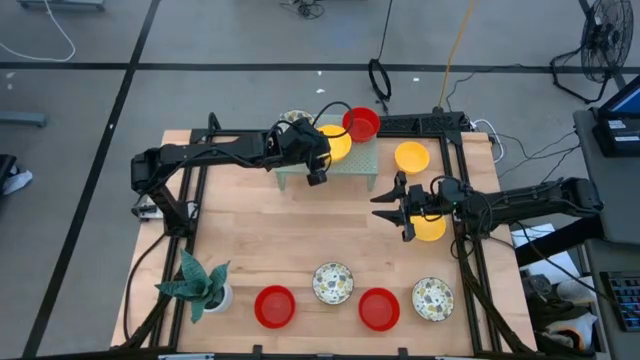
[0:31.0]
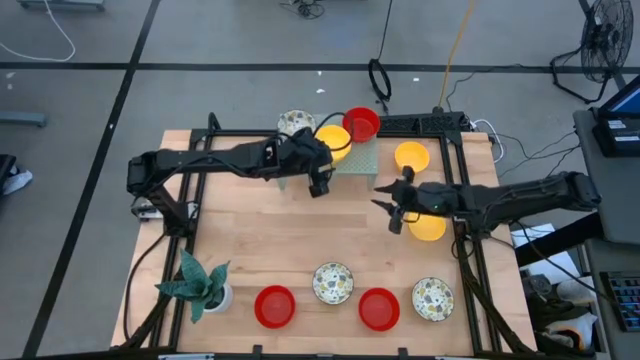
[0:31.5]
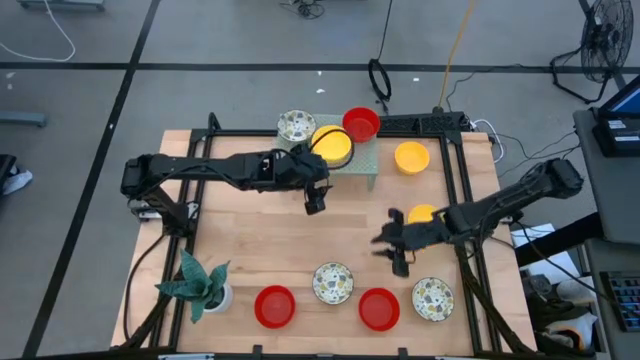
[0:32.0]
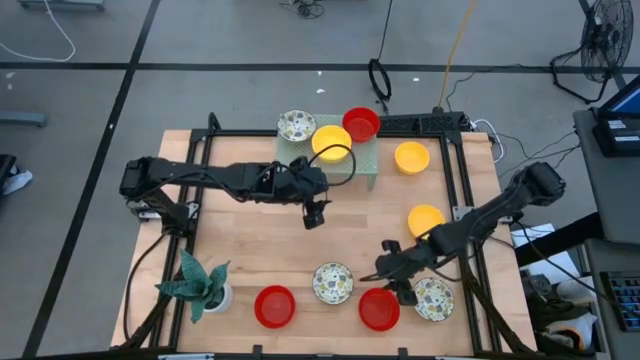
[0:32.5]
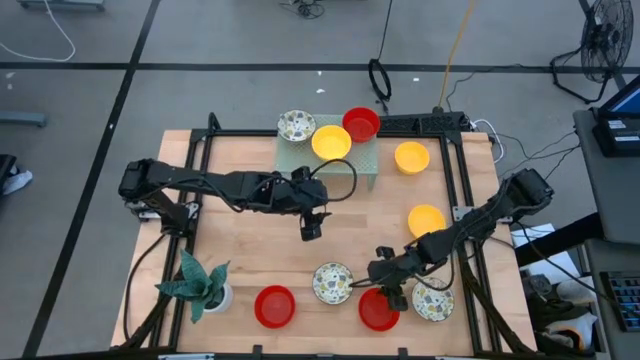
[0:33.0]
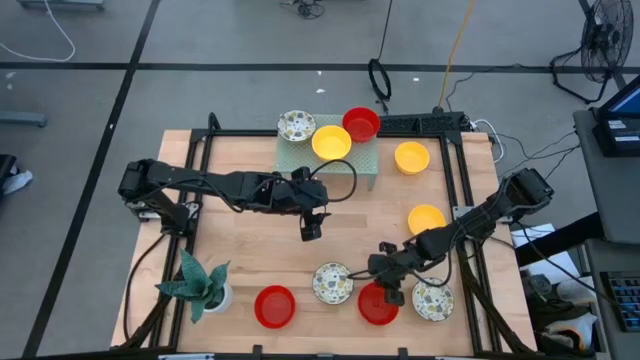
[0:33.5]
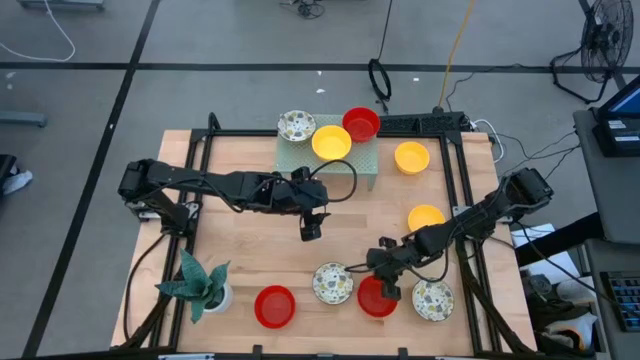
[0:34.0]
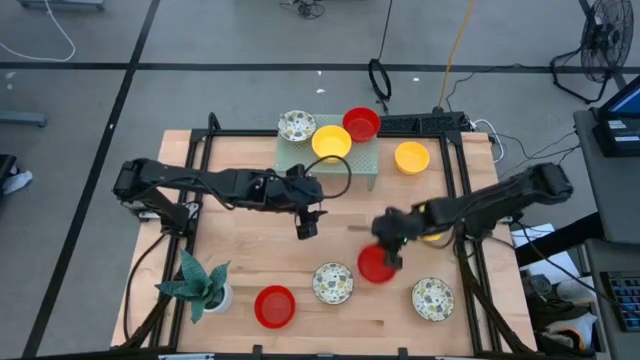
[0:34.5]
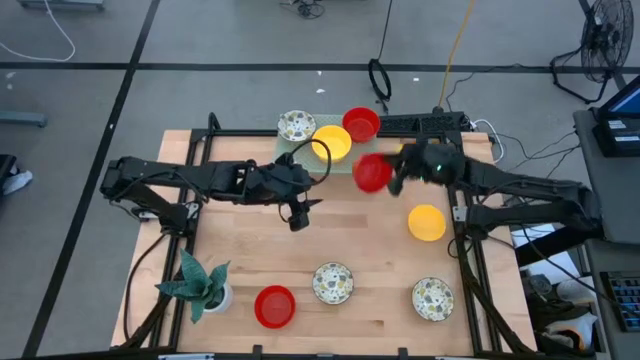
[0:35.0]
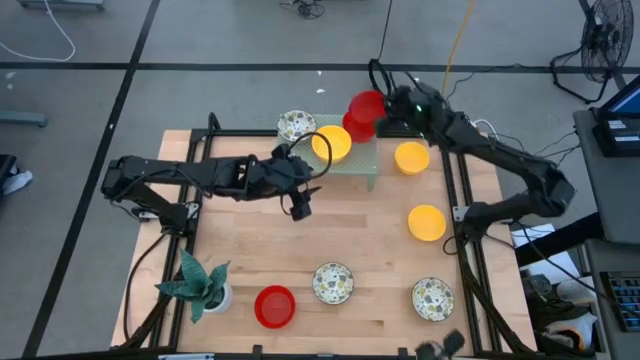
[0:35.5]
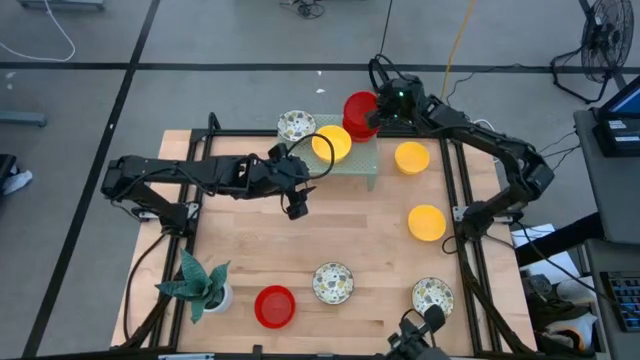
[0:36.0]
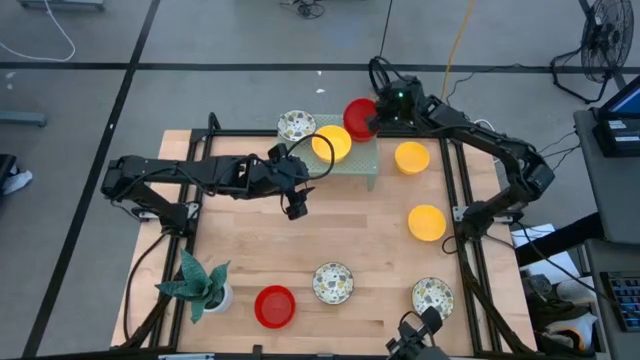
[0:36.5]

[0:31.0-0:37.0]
Task: Pick & Place Mini bowls
Stack the red bowl on top of the other red bowl on the shelf

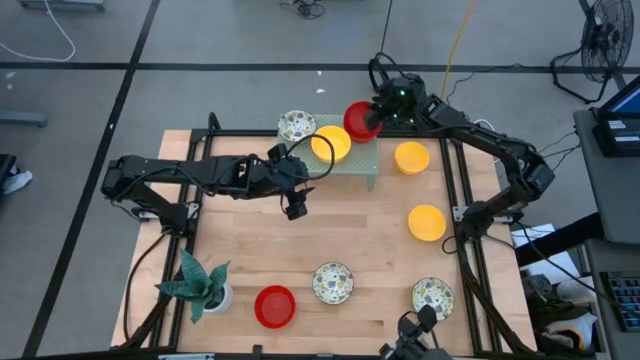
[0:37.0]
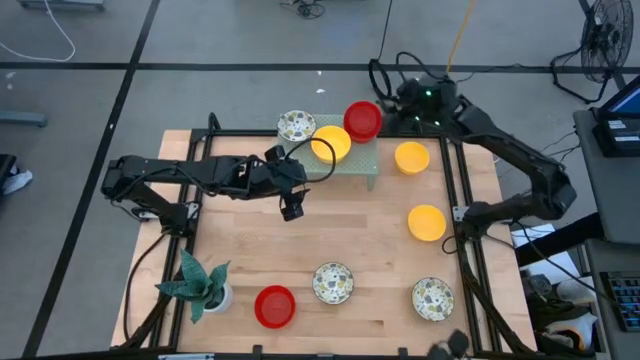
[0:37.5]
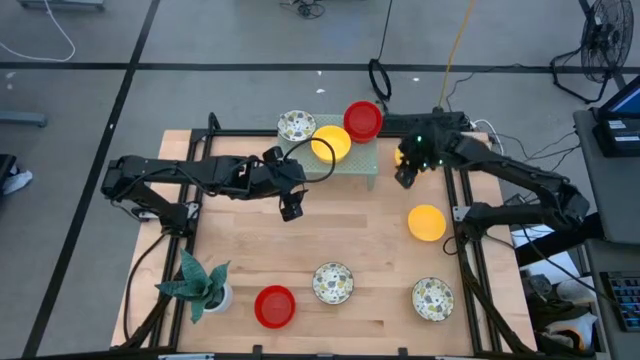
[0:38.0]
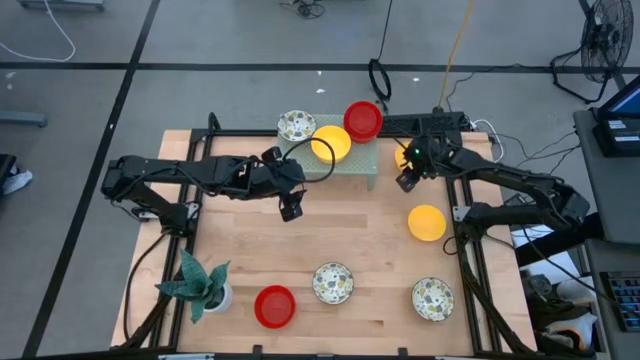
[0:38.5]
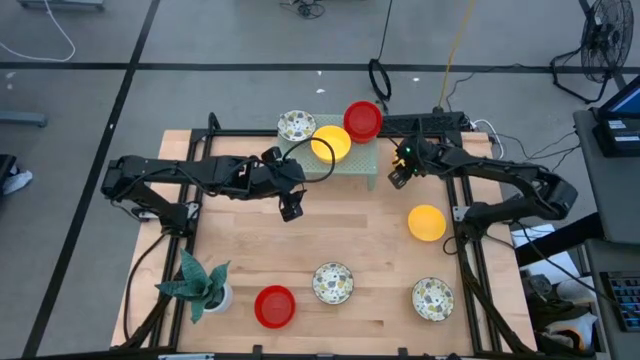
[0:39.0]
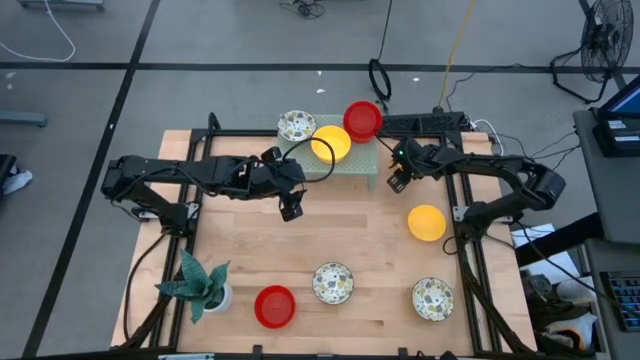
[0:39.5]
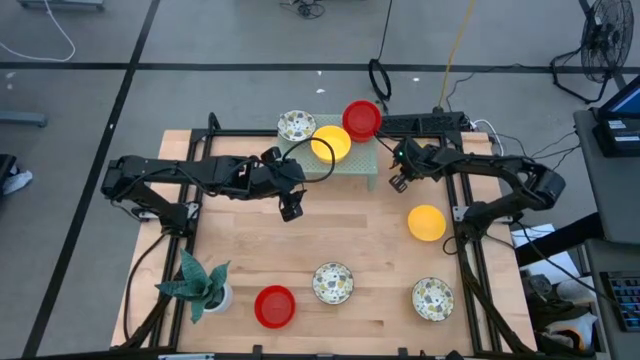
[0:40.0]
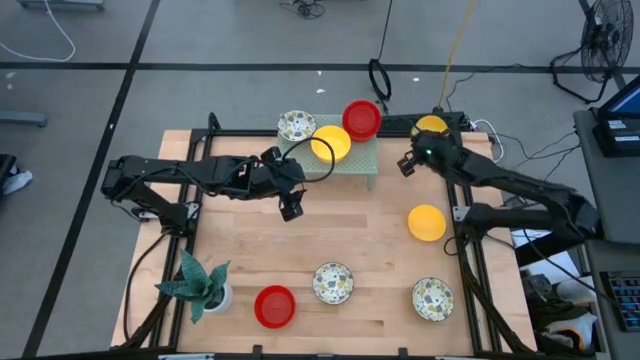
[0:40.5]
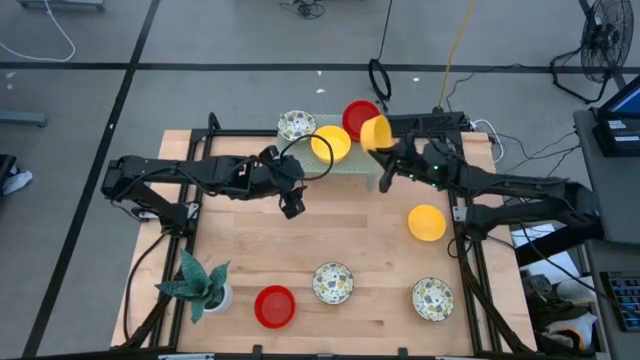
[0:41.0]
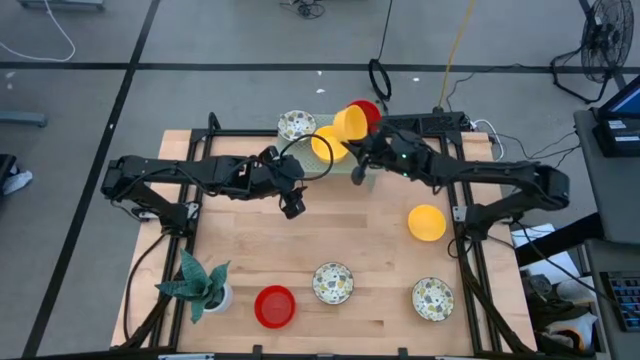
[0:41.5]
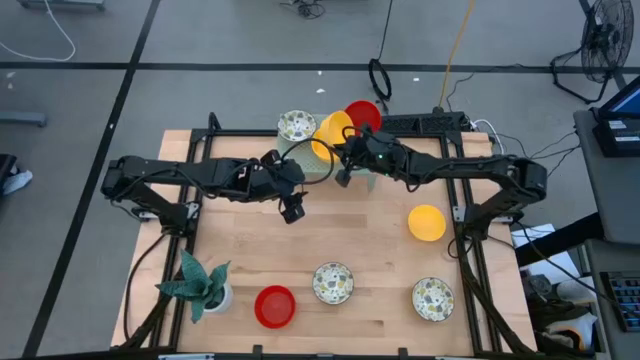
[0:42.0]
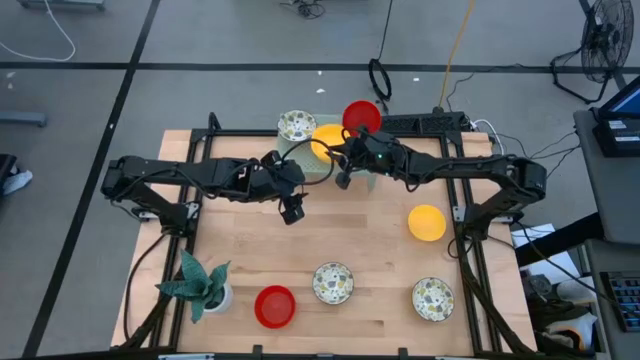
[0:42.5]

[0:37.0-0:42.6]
Stack the yellow bowl on top of the other yellow bowl on the shelf

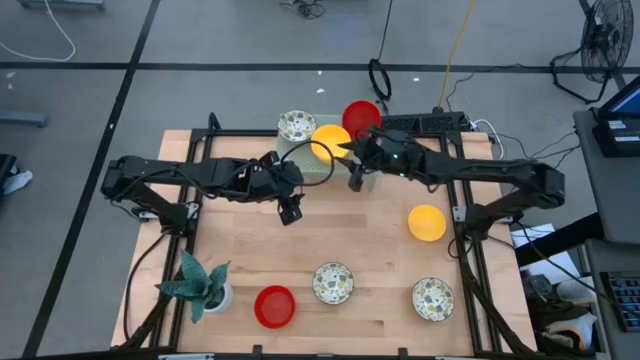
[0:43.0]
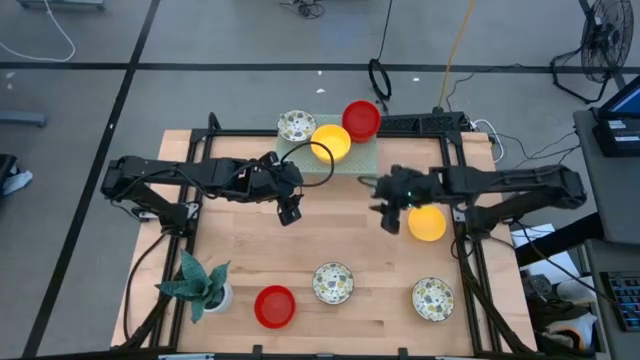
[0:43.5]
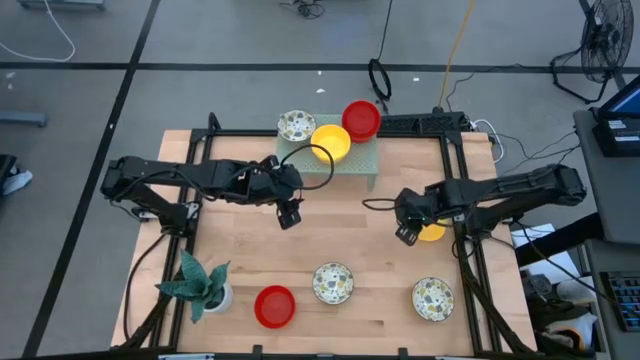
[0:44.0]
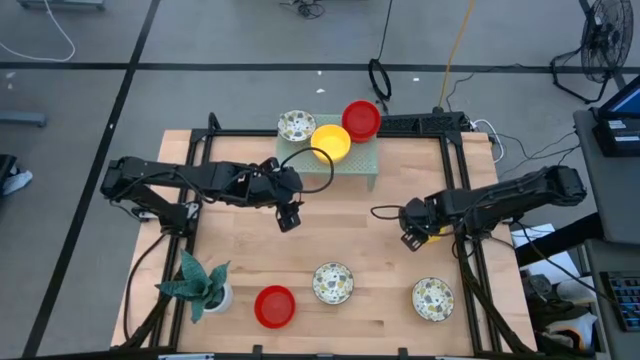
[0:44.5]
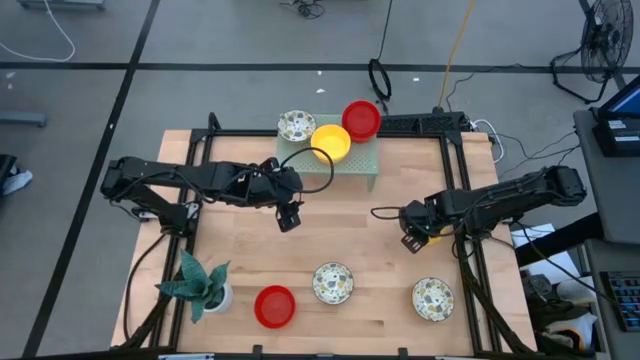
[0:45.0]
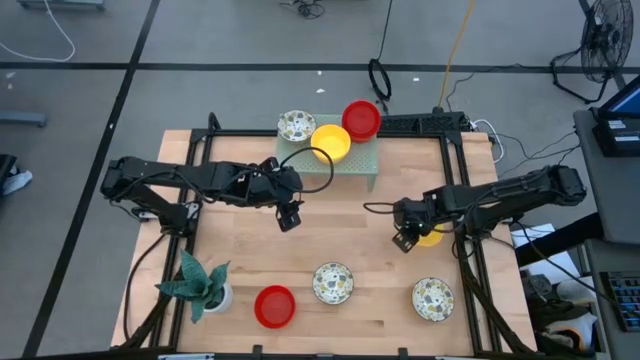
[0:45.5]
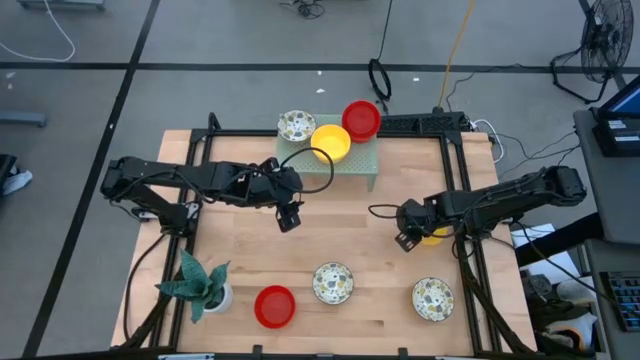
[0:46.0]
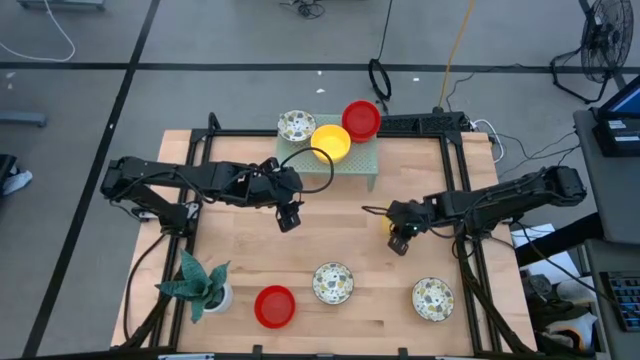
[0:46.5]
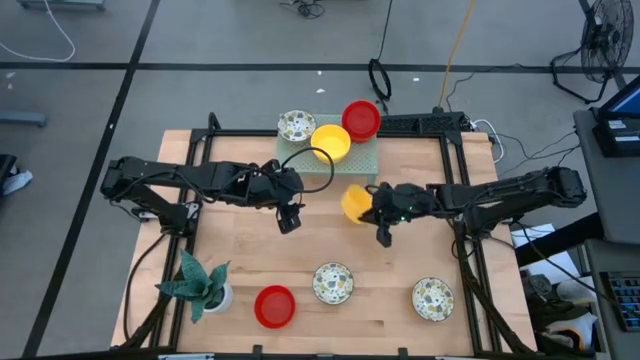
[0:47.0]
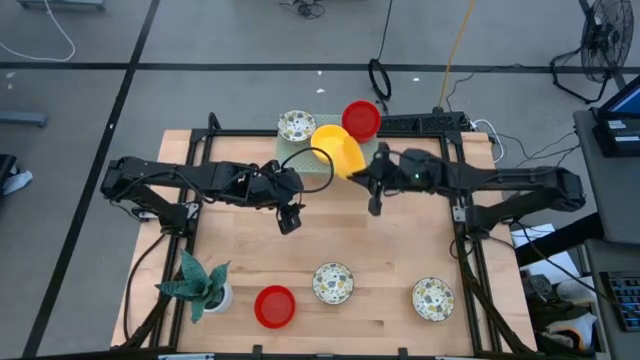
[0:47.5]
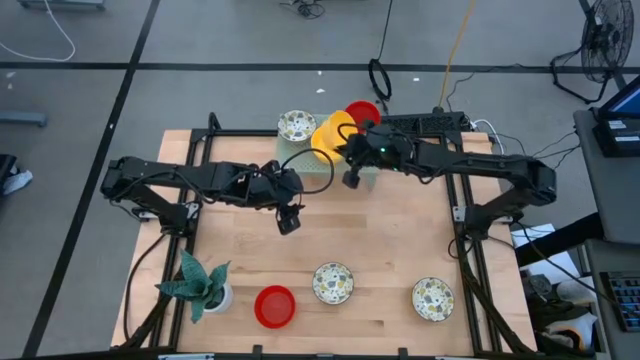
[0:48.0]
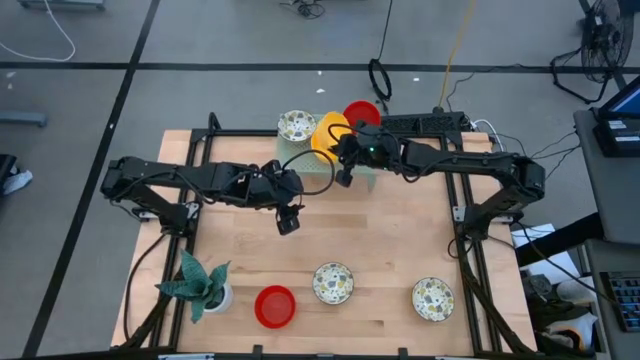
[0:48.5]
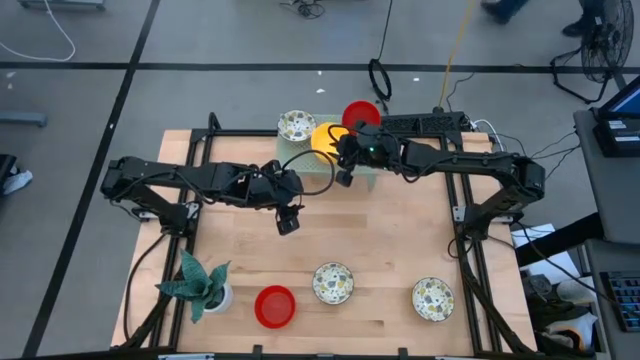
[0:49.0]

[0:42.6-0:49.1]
Stack the yellow bowl on top of the other yellow bowl on the shelf

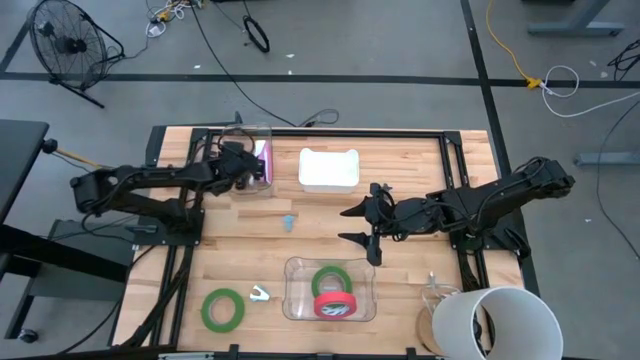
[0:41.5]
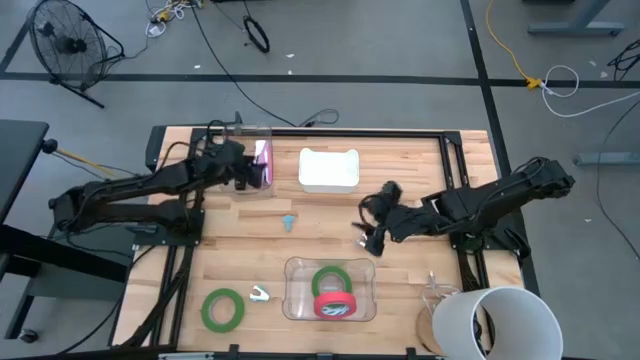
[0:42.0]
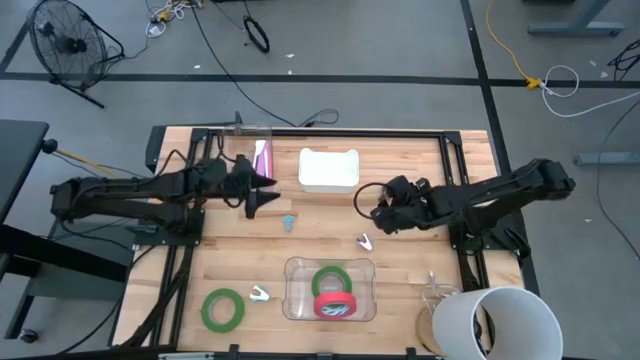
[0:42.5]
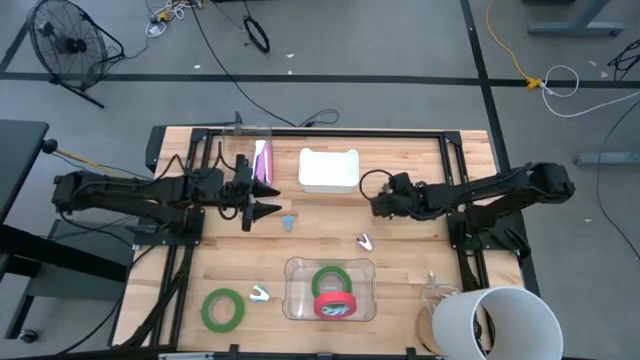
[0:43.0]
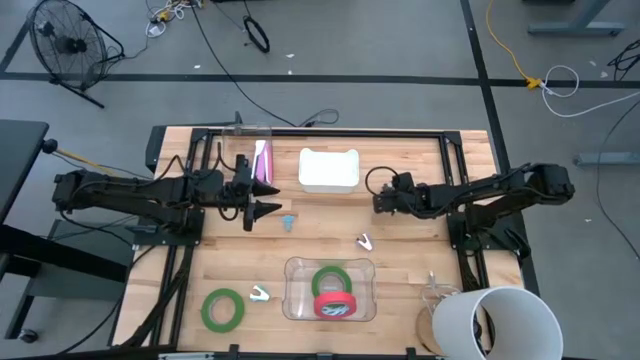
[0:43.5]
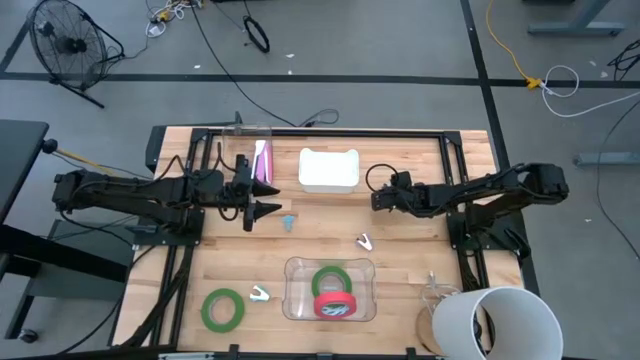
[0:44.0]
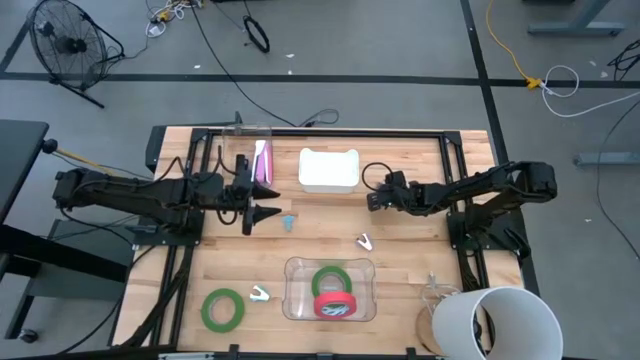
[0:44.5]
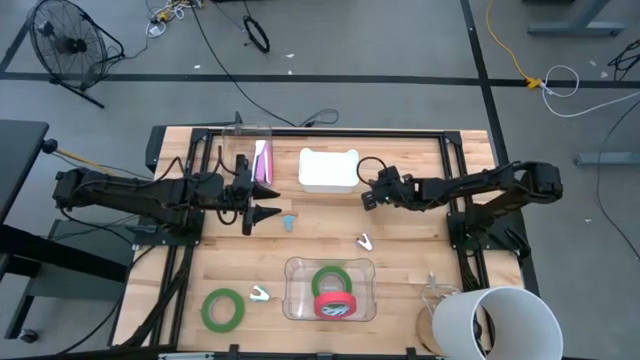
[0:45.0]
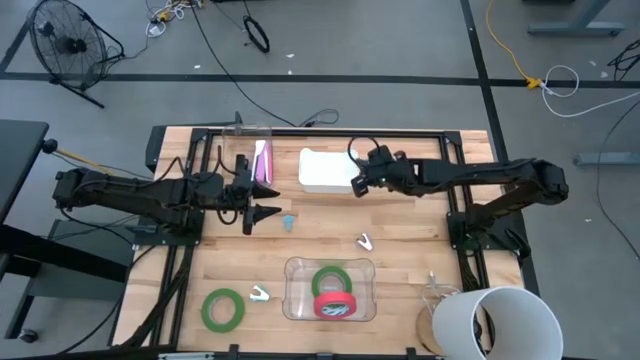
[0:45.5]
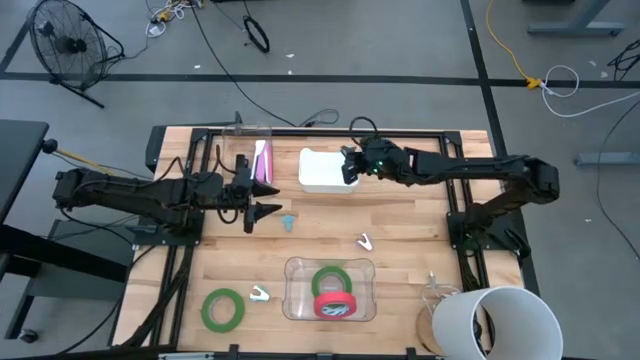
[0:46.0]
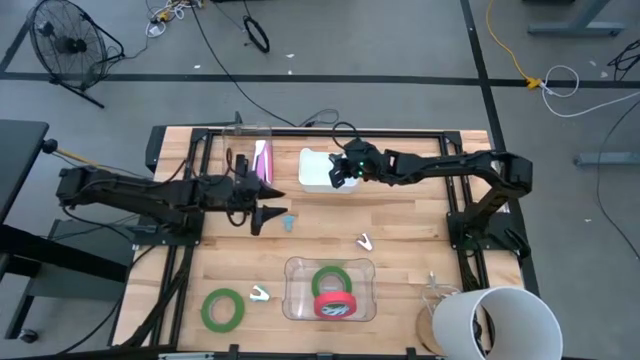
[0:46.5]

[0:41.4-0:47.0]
Task: Pick and place Stapler, Stapler remover, tape
Put the black staple remover into the white bin
